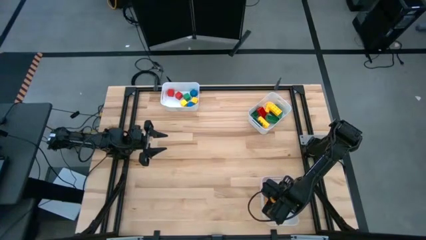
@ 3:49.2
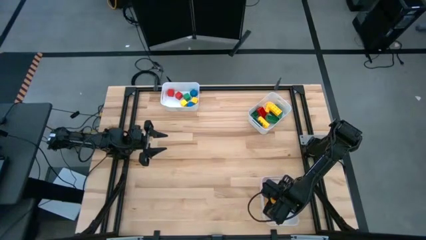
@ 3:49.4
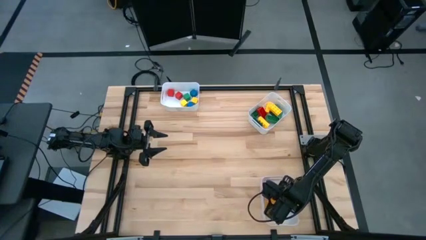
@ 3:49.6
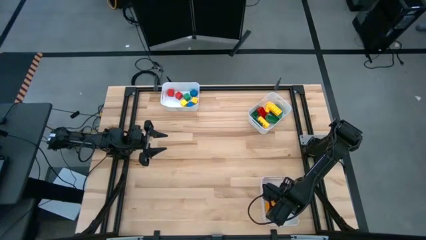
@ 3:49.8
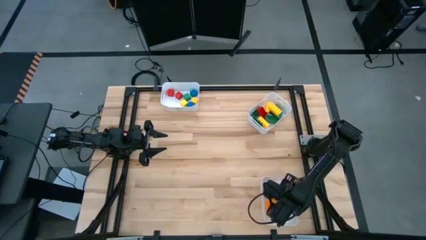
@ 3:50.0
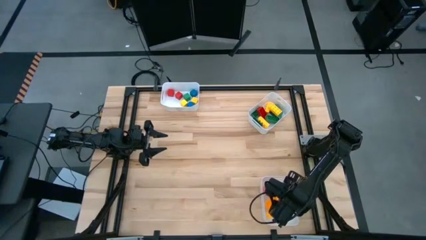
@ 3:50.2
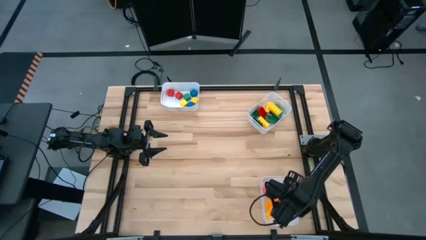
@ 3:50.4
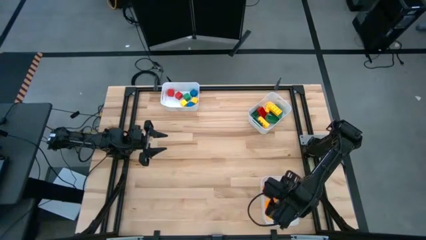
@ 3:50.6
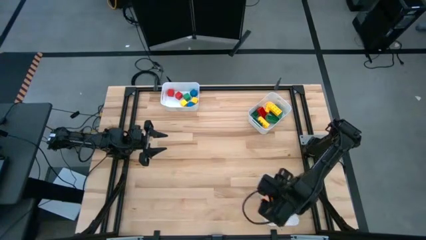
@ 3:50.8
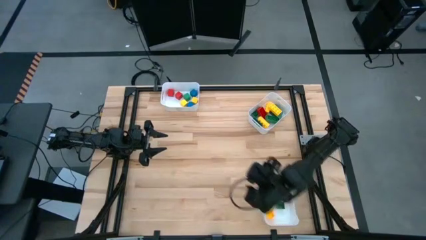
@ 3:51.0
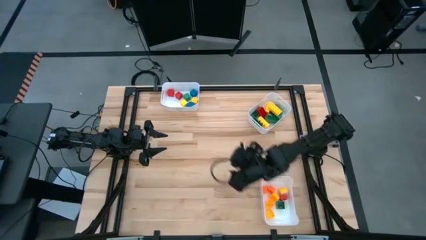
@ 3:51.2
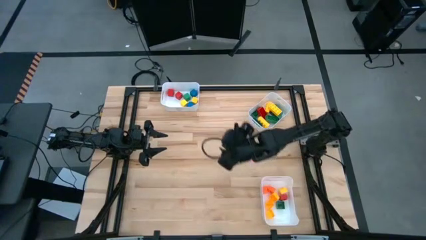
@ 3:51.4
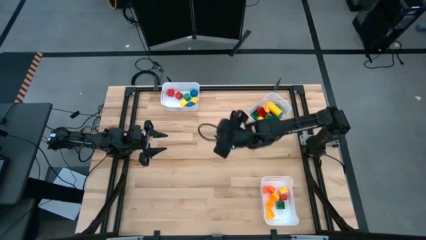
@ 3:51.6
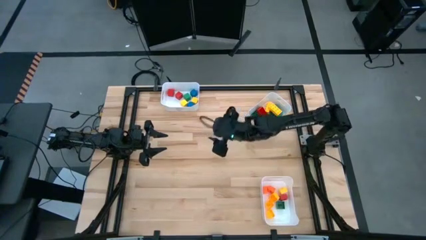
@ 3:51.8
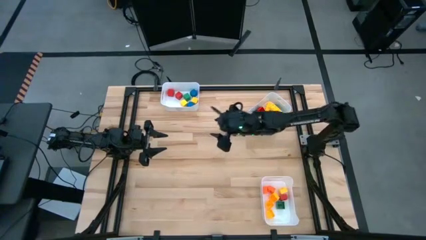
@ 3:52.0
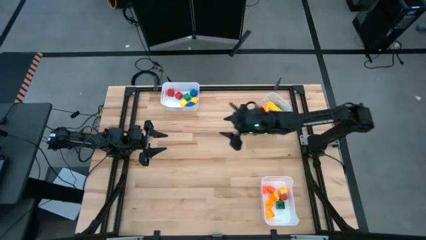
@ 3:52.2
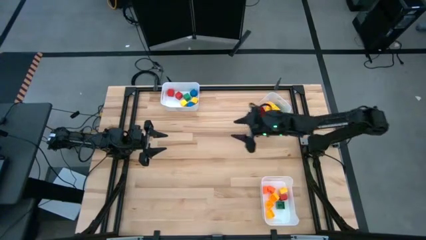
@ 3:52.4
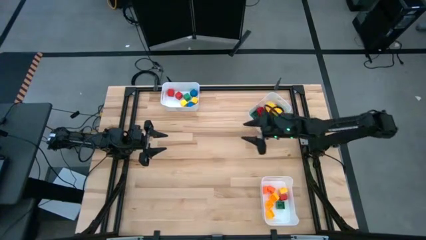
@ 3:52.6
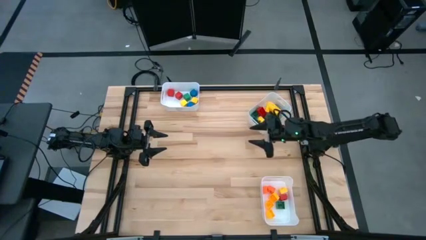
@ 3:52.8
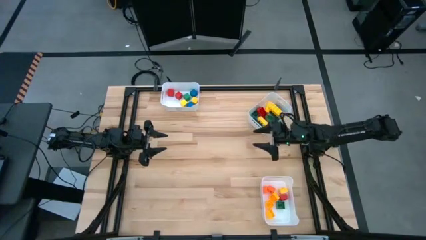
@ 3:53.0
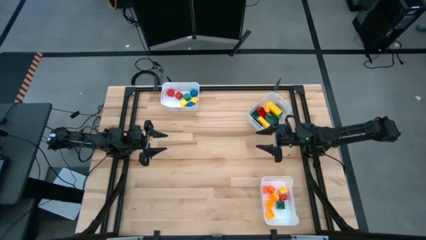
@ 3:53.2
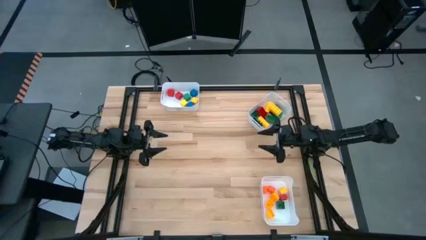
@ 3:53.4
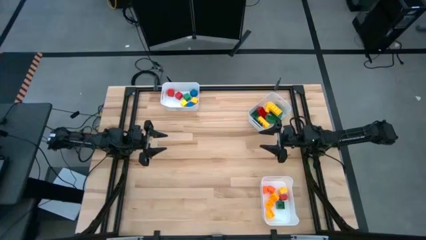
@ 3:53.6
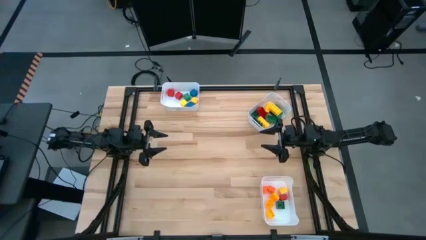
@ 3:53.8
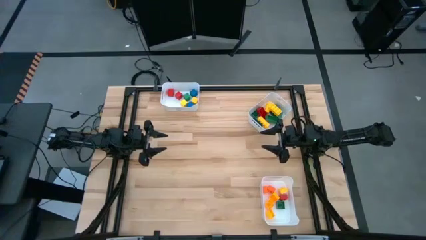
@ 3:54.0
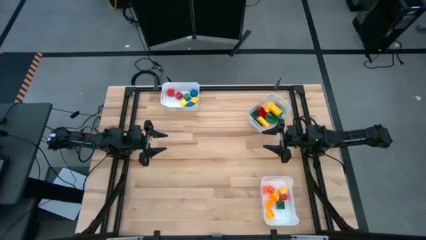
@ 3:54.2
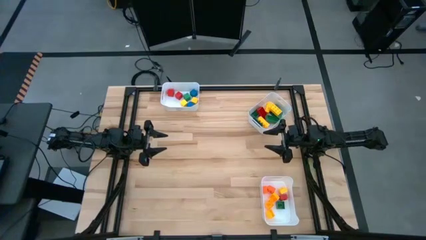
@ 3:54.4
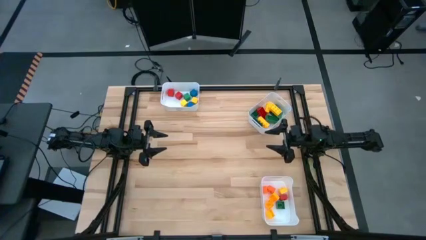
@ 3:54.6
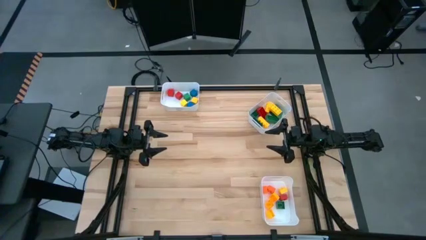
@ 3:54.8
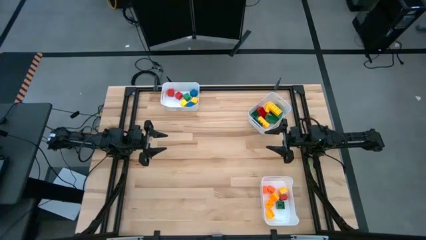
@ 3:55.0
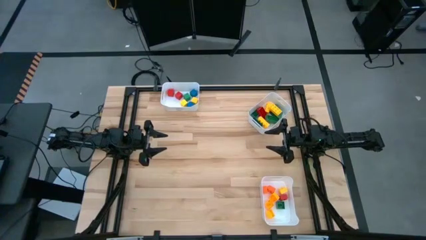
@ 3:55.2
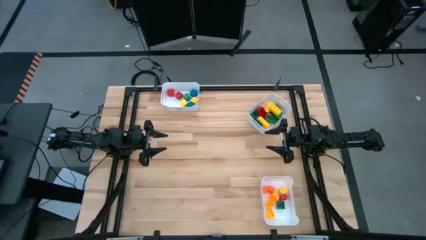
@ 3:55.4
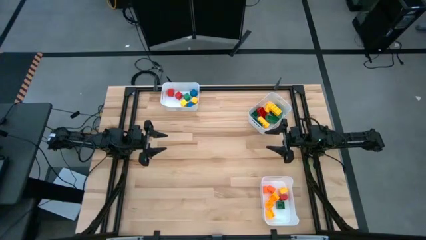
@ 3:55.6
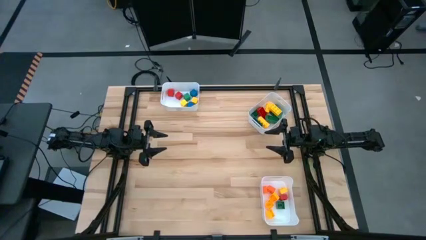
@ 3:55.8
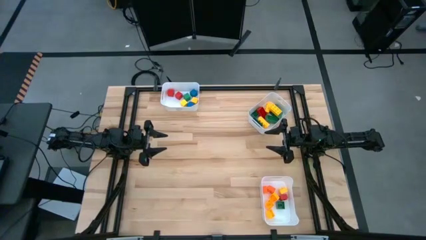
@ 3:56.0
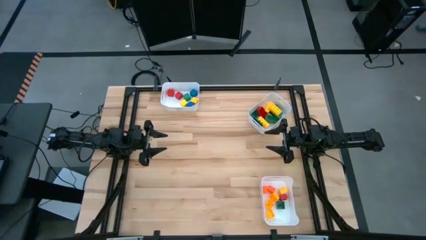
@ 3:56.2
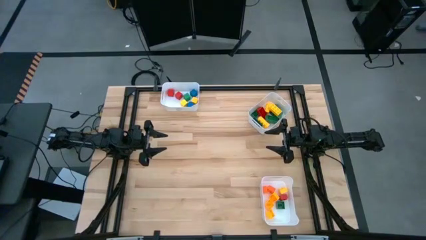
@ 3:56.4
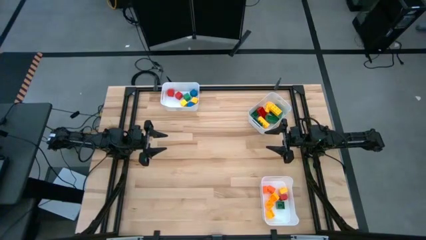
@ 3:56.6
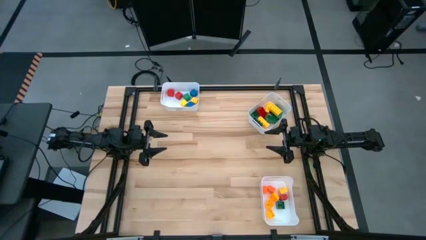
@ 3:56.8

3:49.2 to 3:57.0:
Task: Sort blocks by size
Return to Home Position

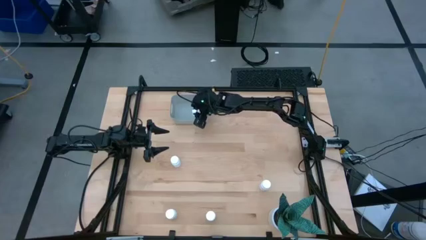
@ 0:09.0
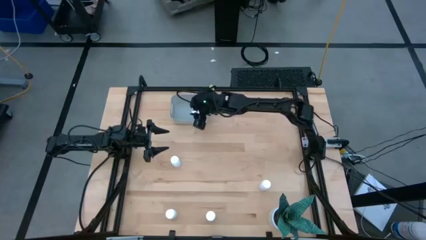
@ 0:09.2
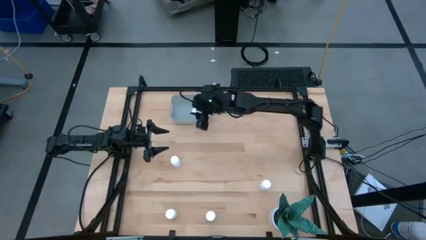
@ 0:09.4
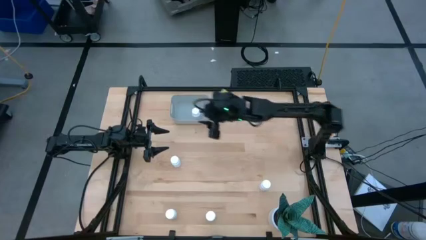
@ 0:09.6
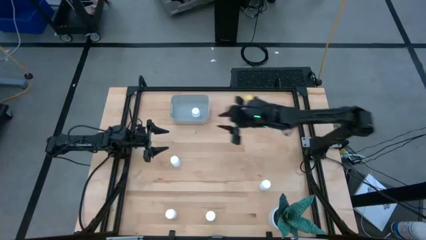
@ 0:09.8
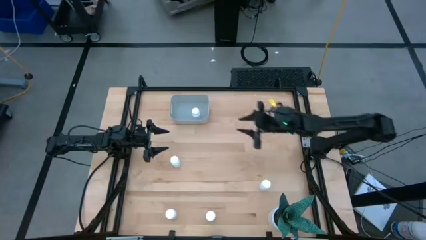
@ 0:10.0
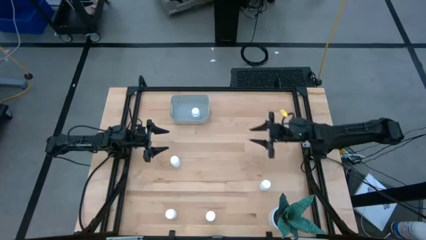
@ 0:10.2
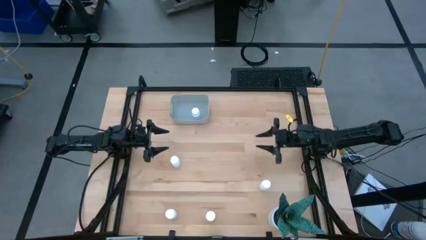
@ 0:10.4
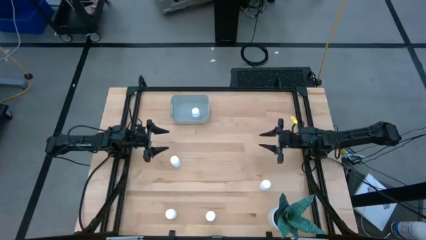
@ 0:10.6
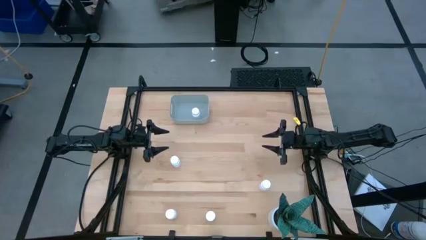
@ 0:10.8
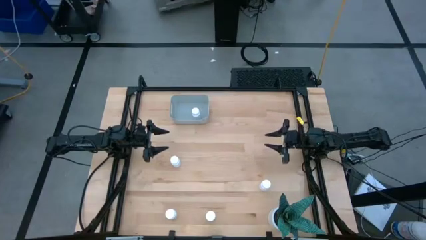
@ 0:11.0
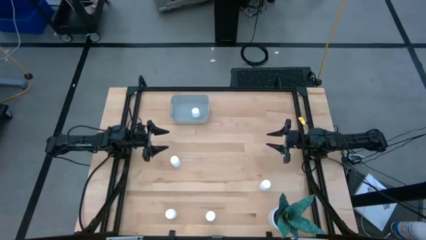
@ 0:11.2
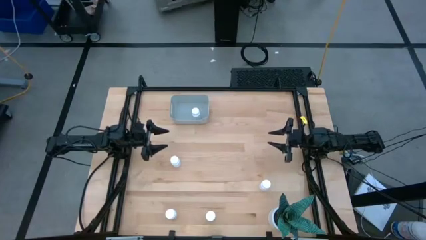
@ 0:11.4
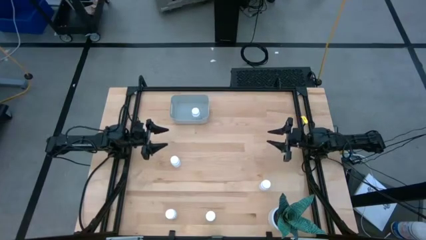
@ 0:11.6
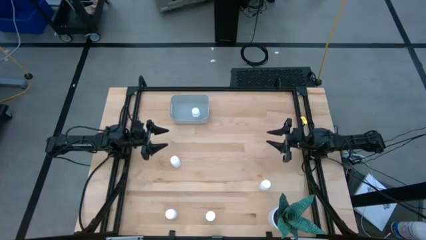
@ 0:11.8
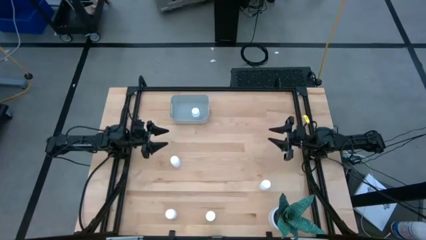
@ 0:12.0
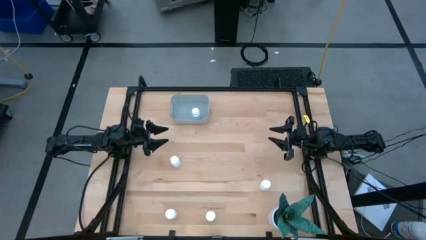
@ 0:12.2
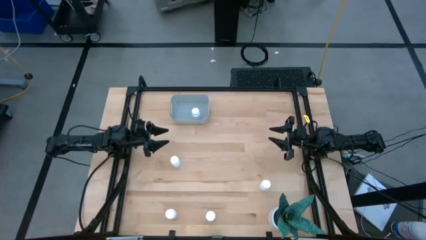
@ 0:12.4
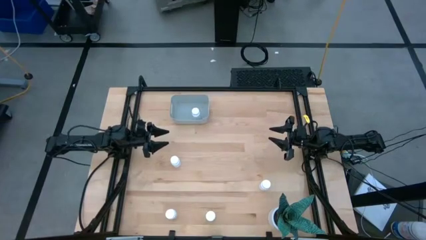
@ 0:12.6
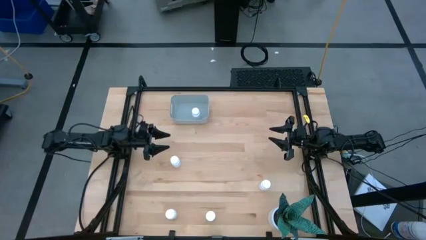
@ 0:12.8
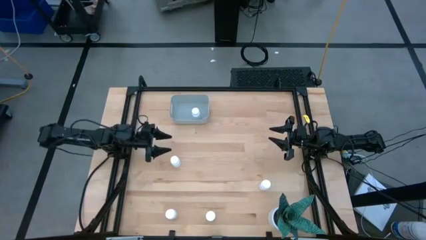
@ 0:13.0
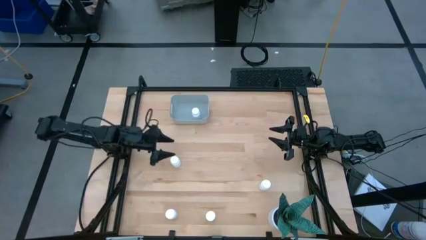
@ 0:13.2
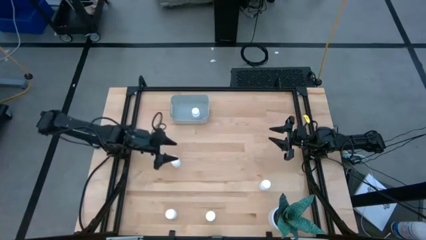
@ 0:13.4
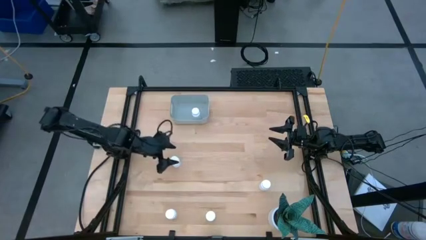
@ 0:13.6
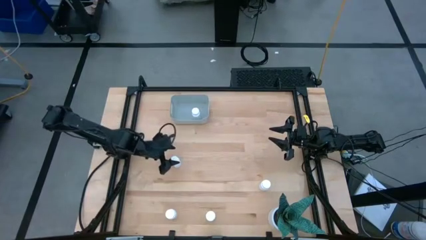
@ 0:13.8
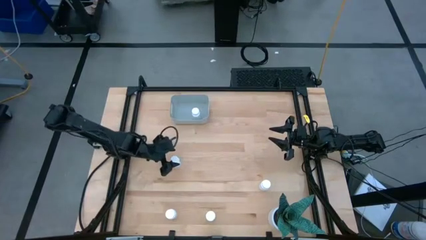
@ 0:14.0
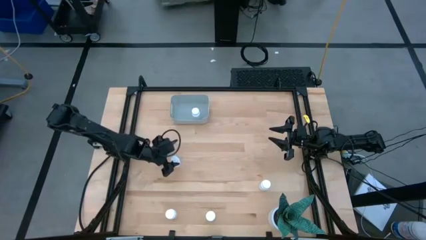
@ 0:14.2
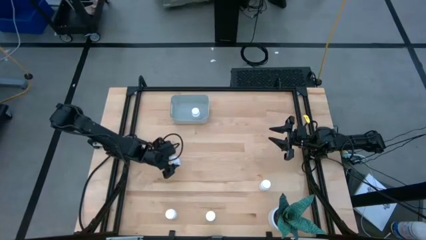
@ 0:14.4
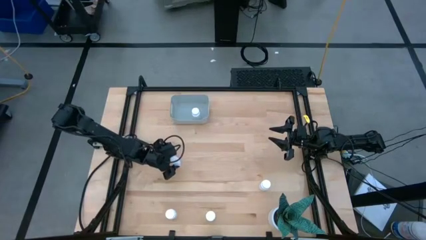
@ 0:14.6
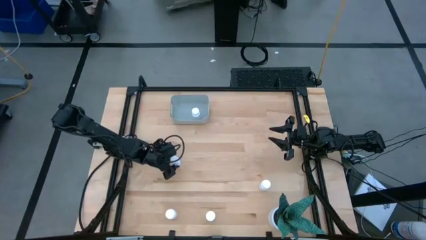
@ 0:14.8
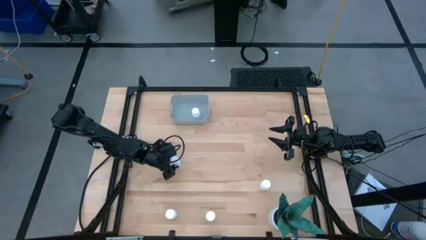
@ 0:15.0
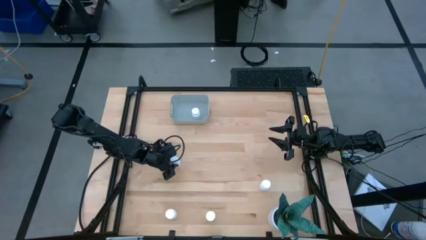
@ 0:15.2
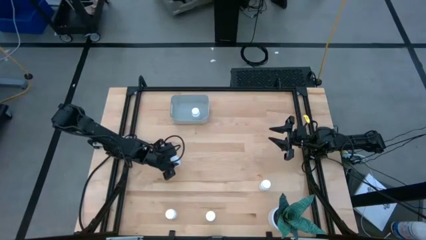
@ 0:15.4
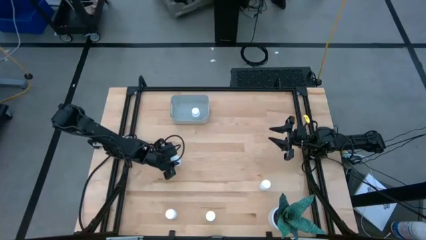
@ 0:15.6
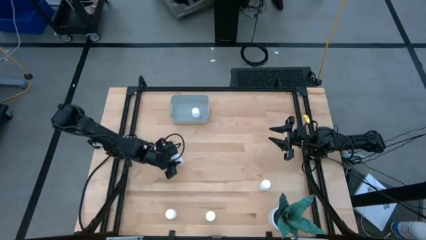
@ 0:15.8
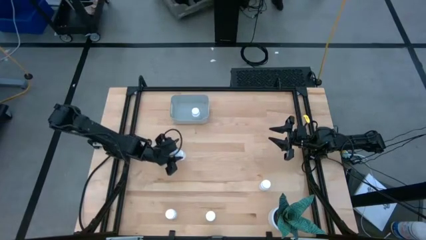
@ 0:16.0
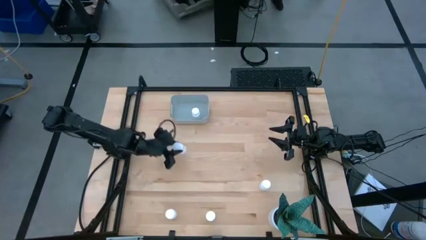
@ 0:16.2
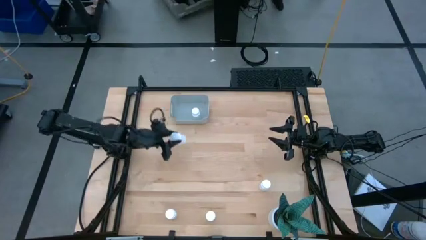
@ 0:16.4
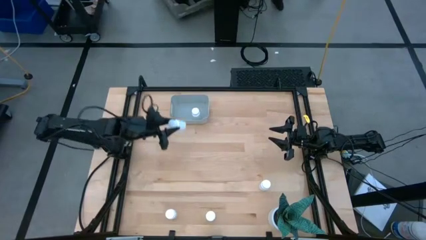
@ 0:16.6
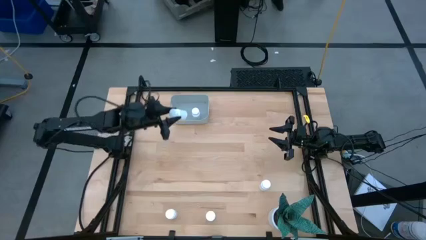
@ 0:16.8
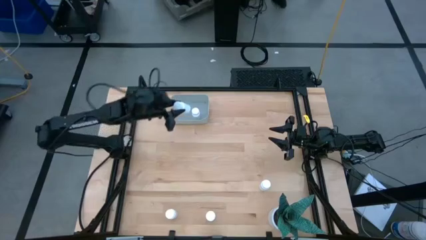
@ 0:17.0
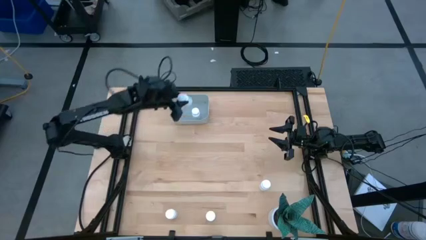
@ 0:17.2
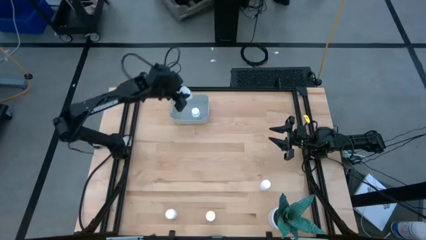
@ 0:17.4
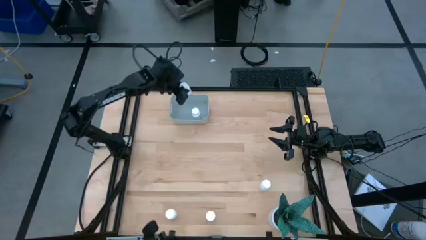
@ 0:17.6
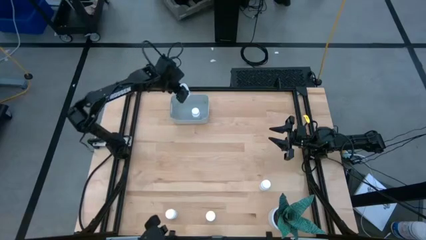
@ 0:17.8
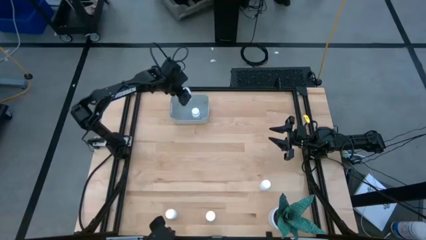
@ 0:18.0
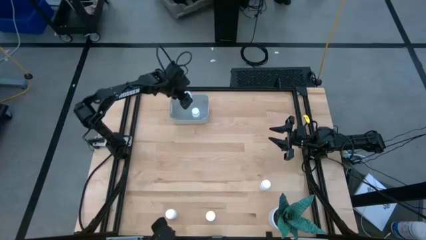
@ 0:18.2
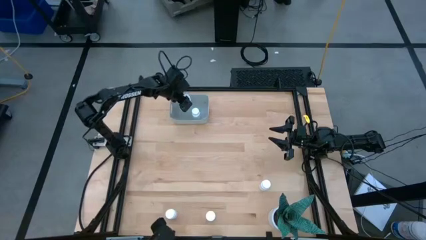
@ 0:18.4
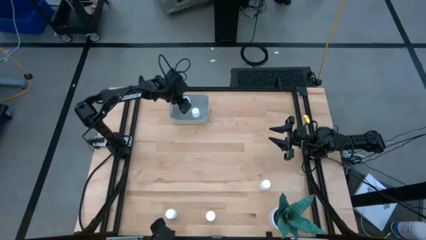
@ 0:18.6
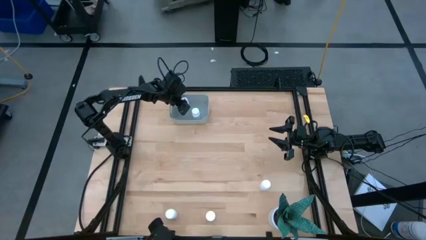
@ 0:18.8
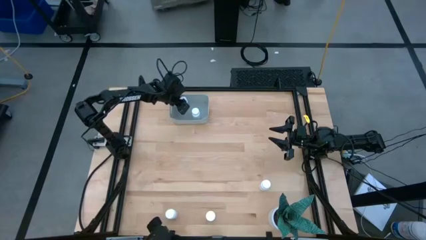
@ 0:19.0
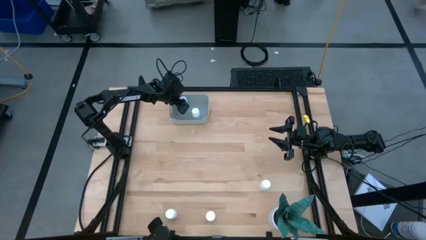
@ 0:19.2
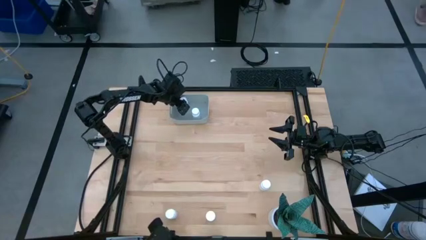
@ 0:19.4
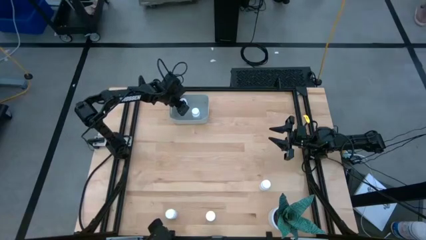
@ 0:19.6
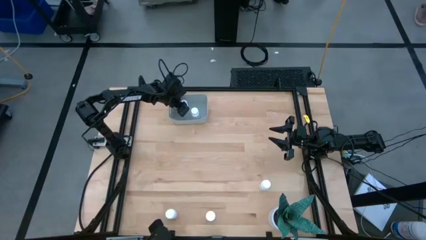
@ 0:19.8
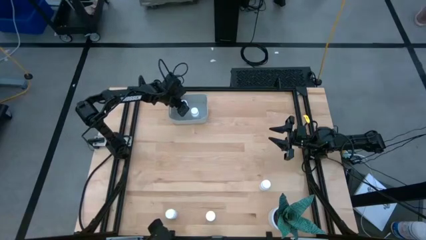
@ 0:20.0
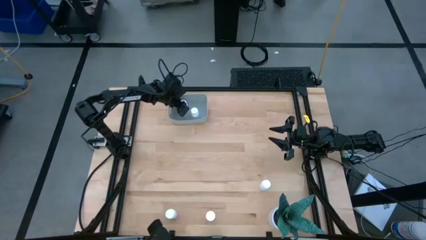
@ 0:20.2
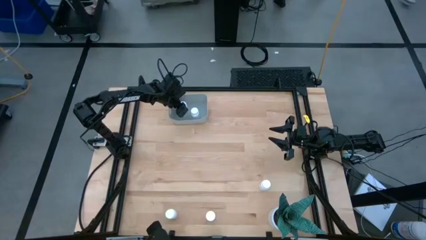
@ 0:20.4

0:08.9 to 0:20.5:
Task: Pick and place pill bottles into a basket
Put the white medicine bottle into the gray bin
